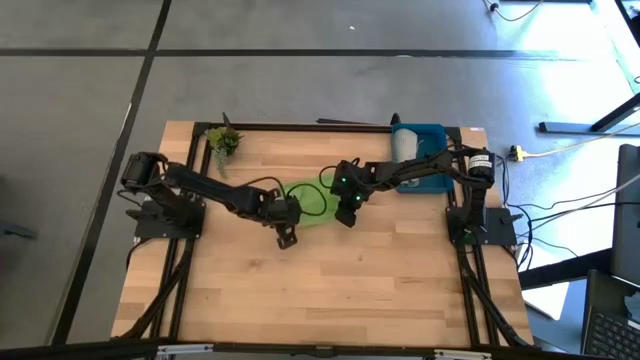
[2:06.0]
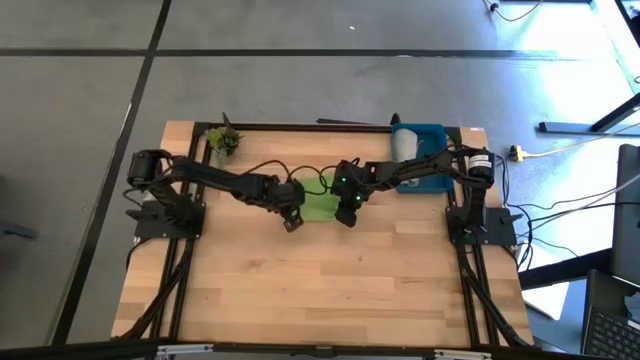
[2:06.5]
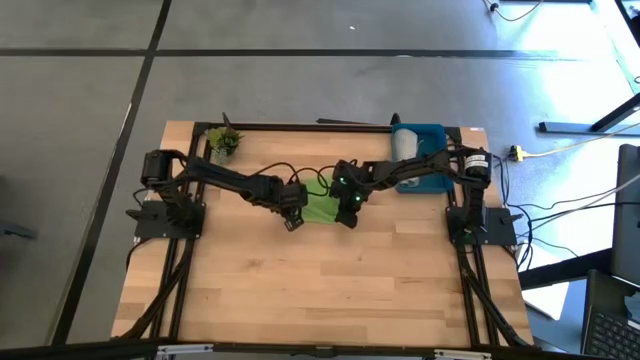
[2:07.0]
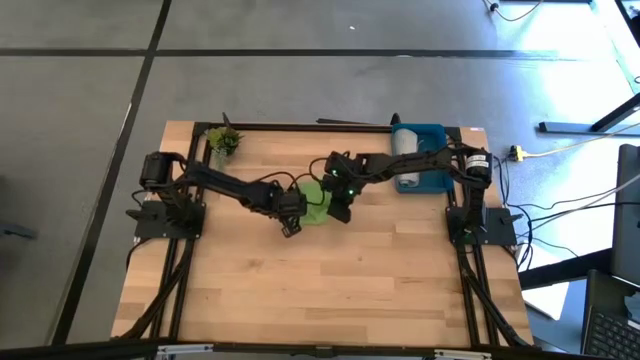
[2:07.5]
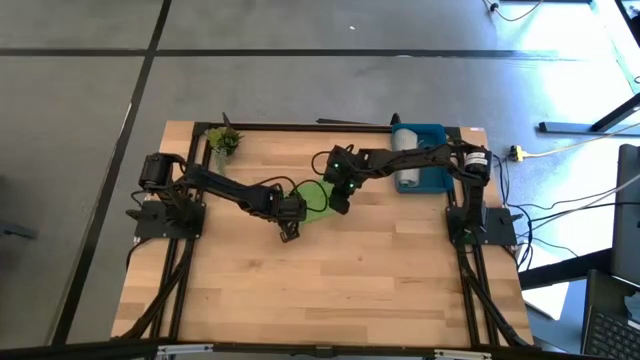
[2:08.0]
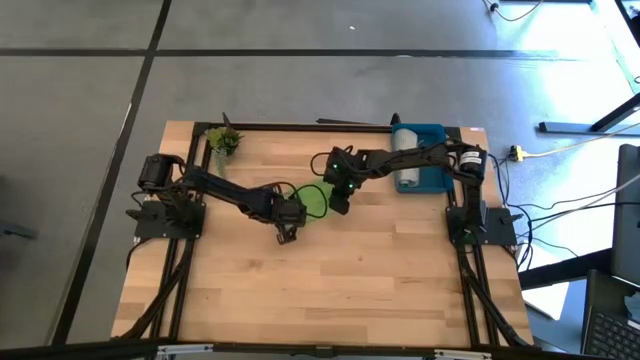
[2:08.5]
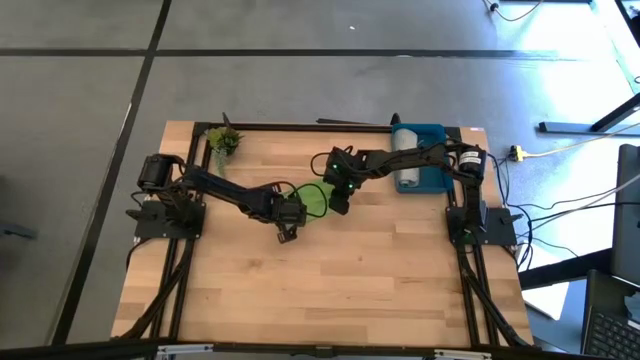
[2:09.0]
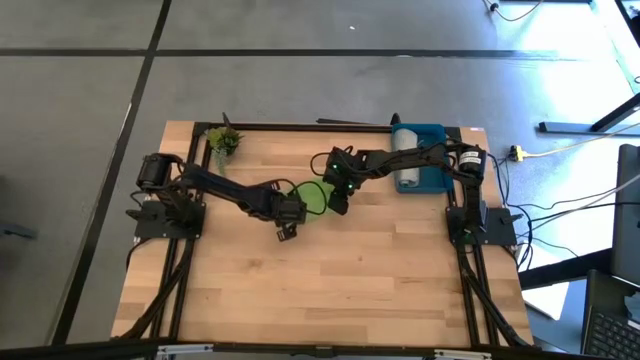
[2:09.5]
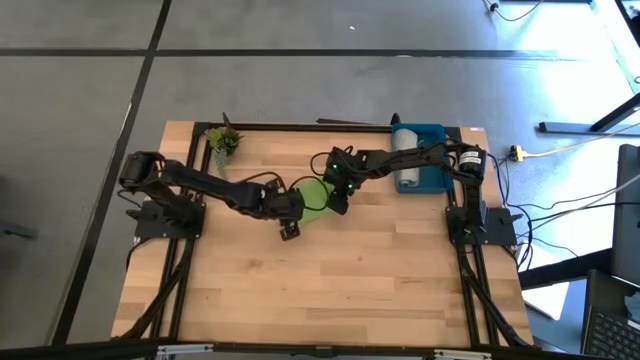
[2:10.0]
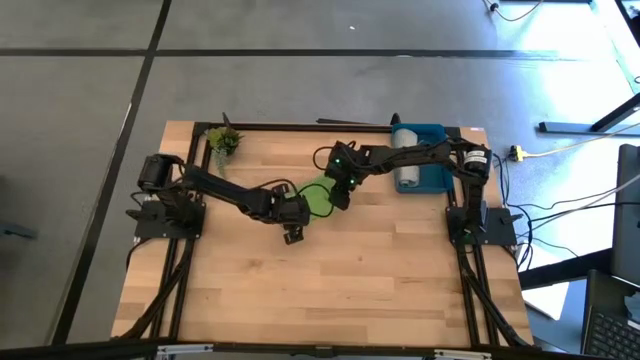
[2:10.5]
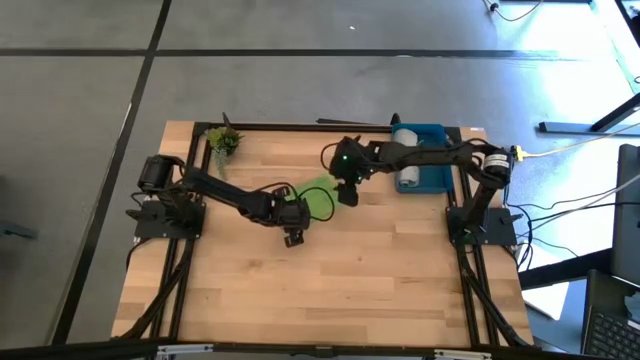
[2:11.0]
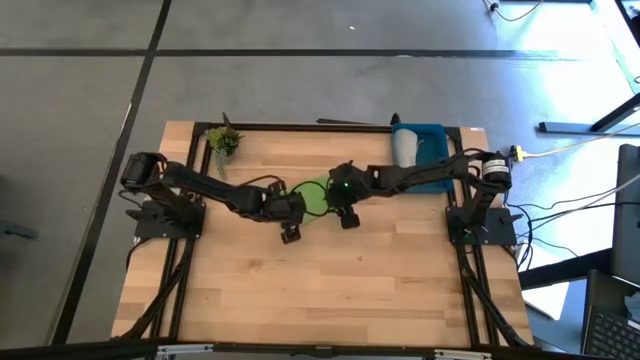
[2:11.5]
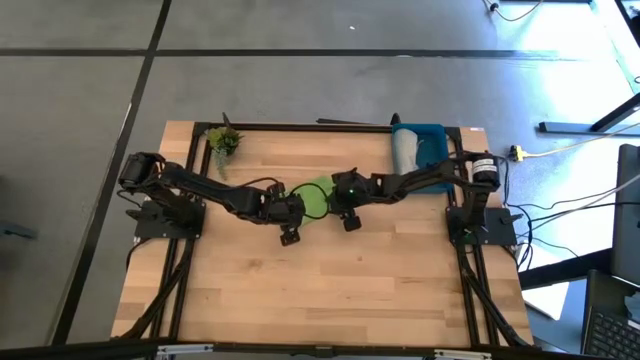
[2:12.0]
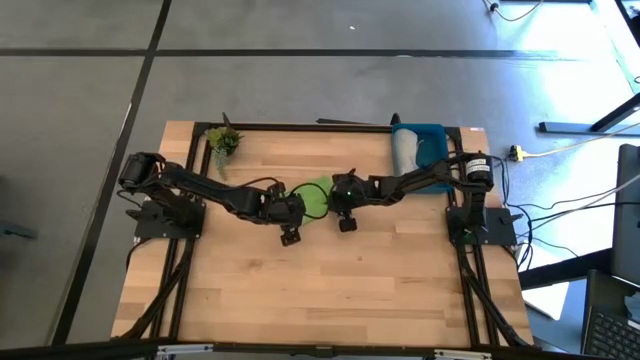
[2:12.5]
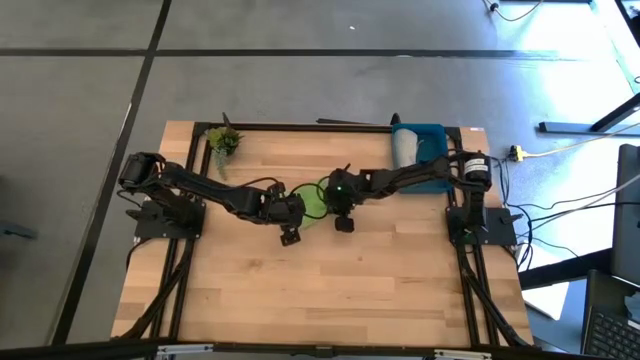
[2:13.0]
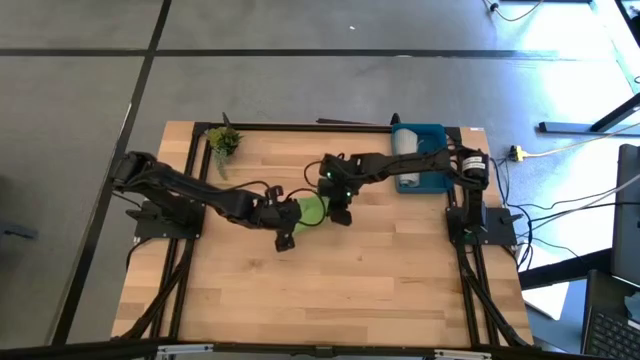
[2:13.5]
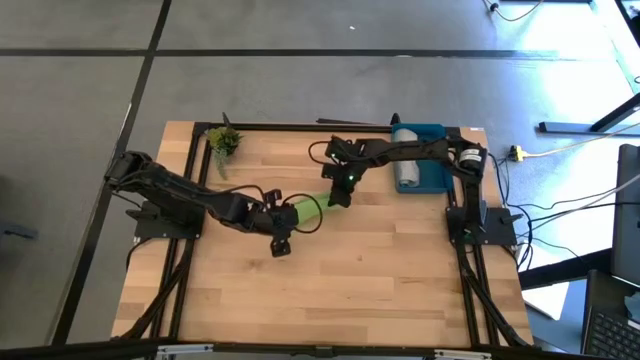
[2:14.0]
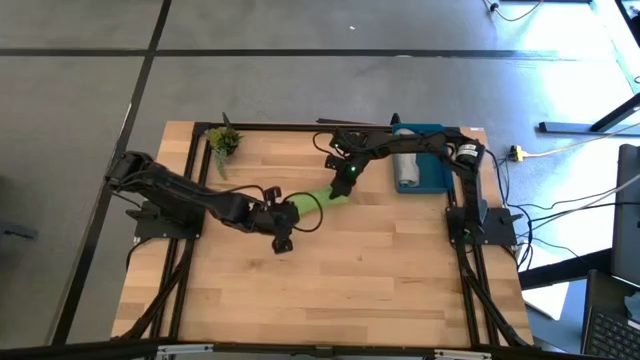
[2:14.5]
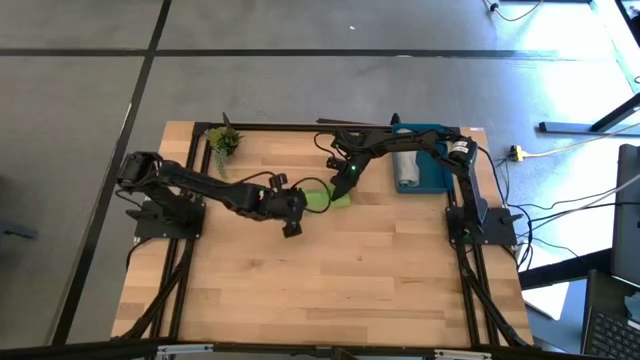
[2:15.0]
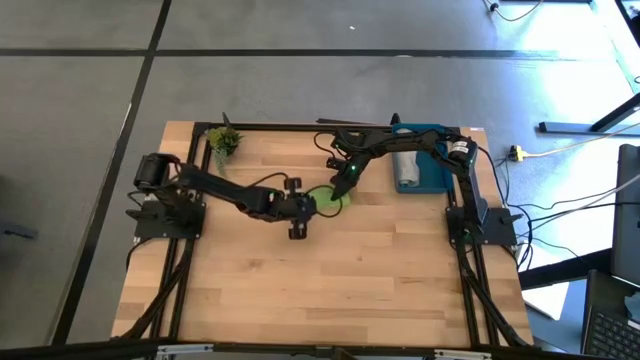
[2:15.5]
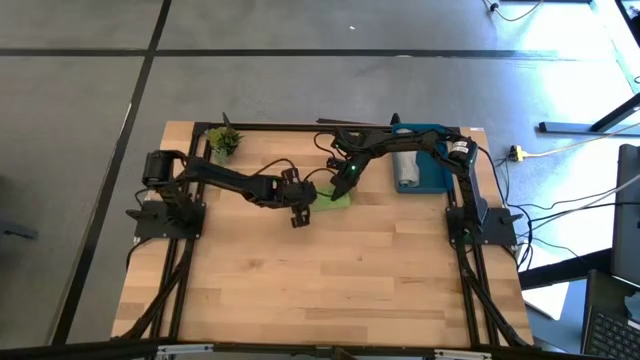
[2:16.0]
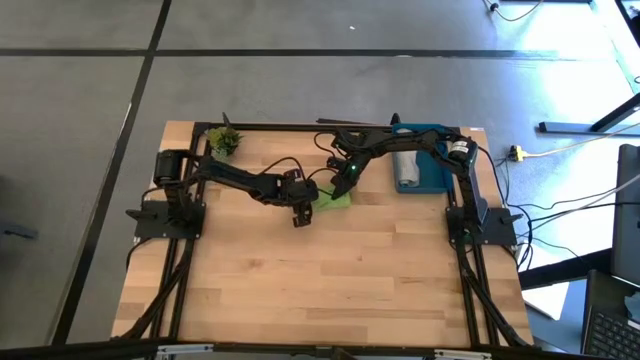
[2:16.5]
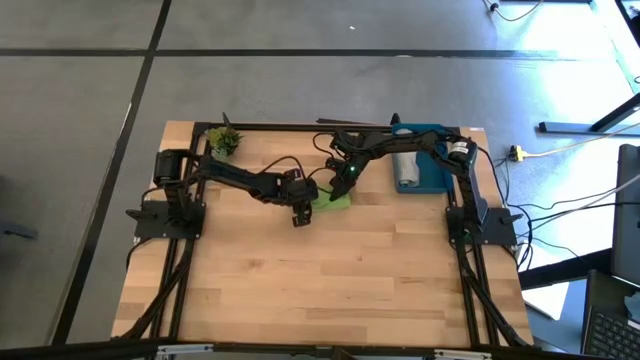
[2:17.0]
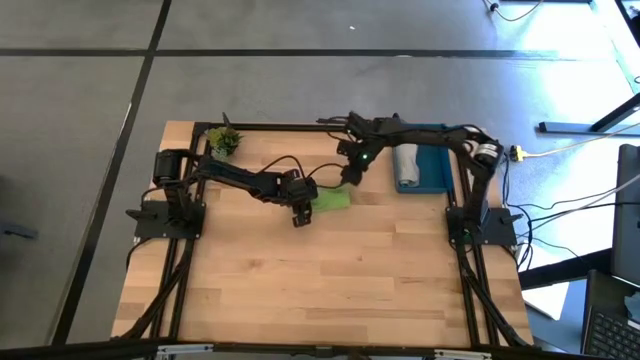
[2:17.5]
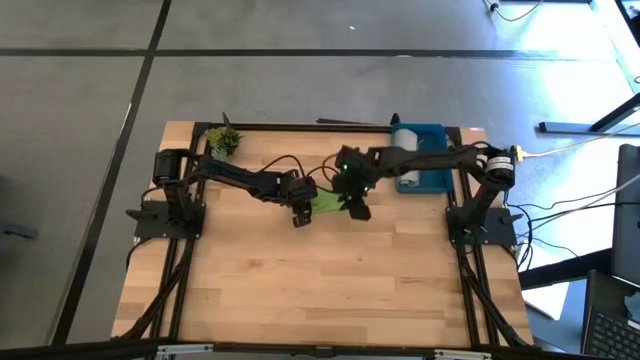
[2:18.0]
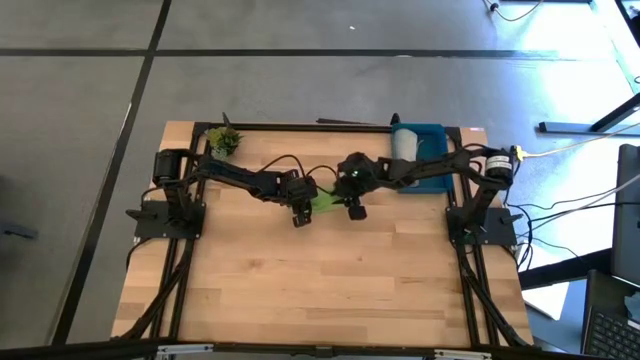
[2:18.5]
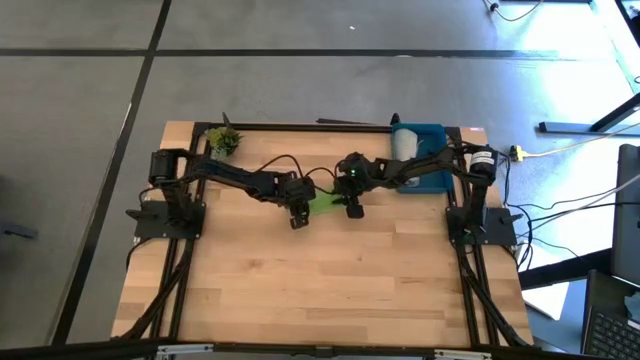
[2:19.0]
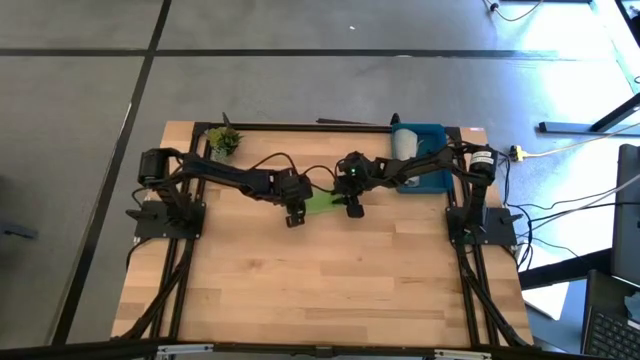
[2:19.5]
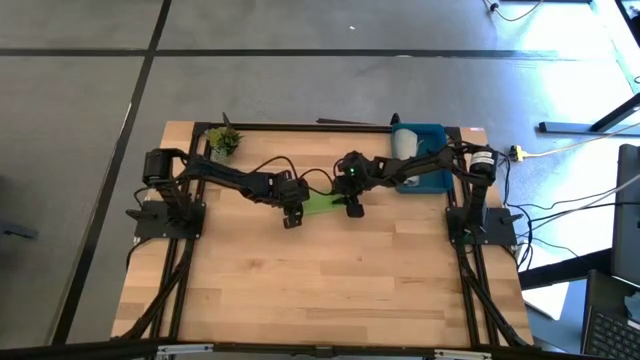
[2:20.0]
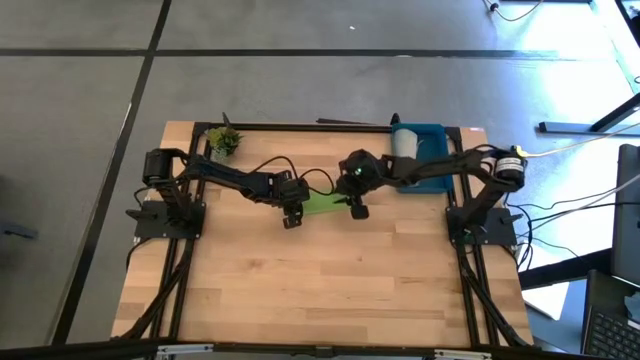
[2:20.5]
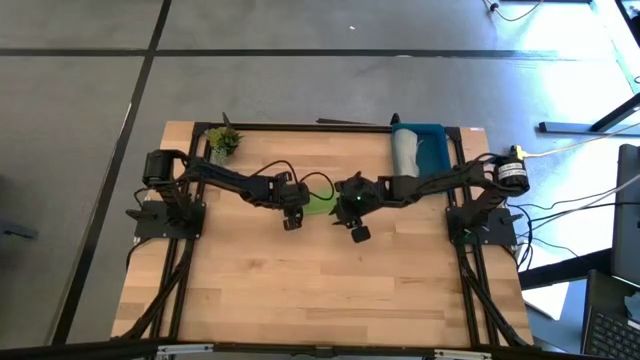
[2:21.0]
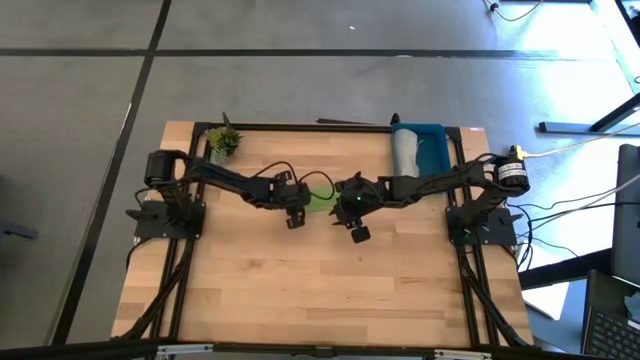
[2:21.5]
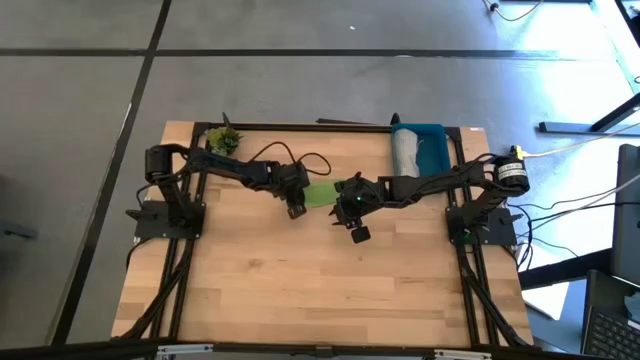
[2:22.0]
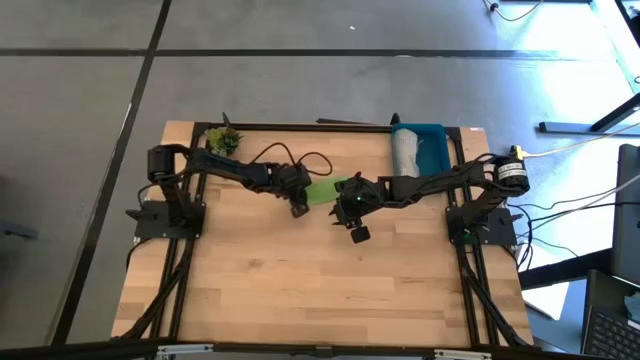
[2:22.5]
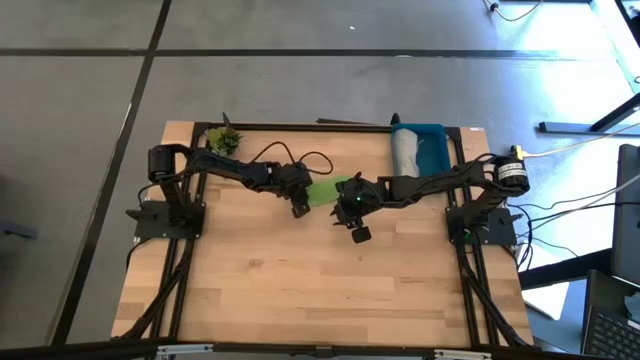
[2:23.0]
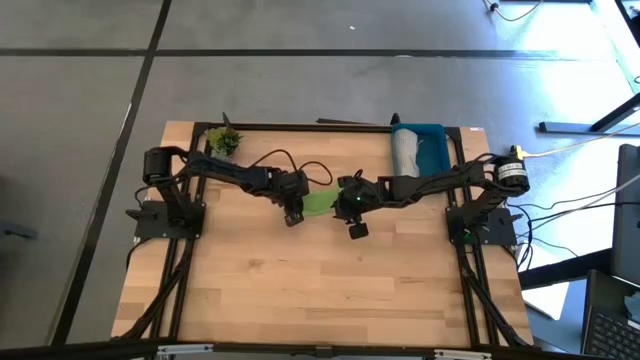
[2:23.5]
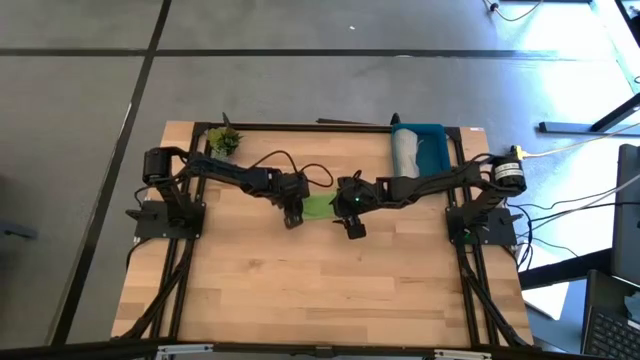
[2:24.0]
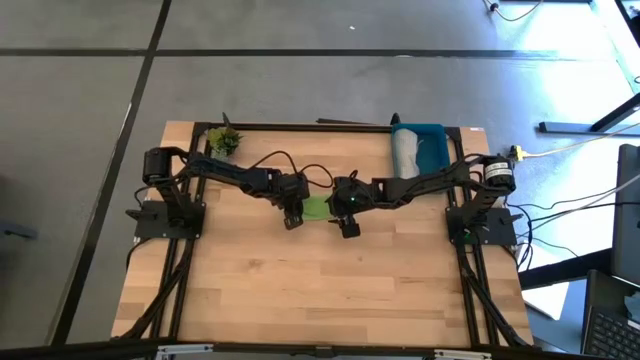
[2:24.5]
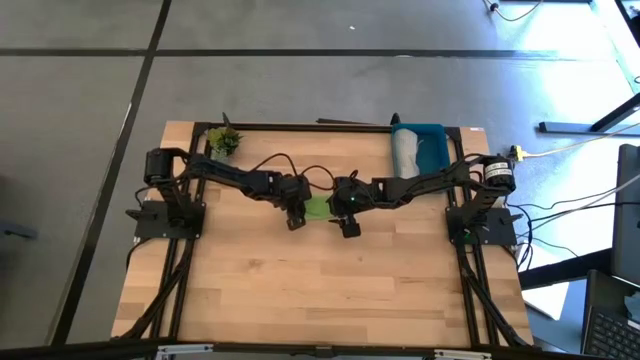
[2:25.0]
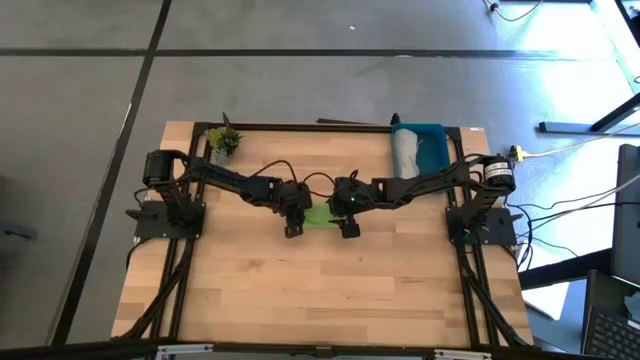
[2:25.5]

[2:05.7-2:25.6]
Task: Roll microfiber towels into tight, uniform cylinder then place into a basket
Roll the green towel
